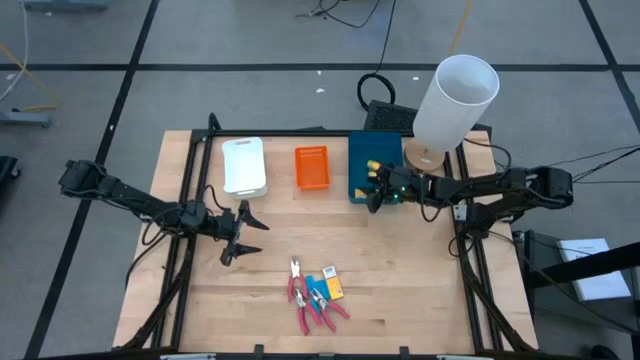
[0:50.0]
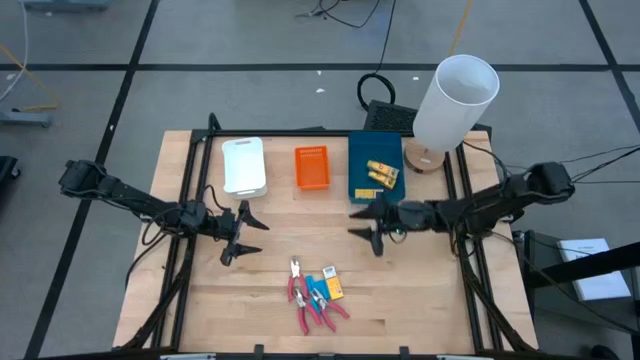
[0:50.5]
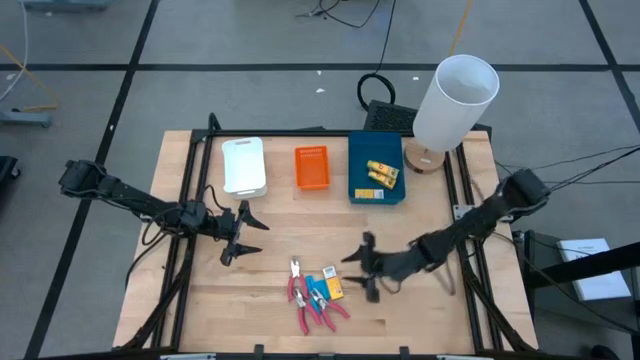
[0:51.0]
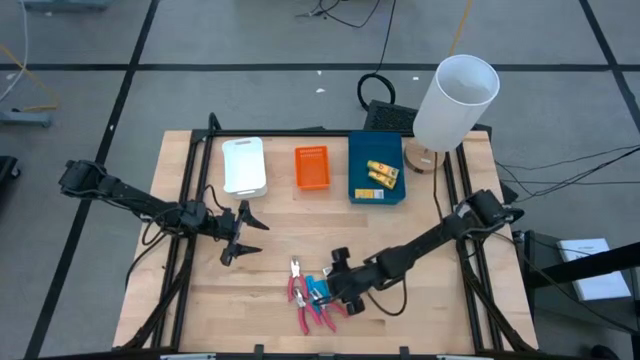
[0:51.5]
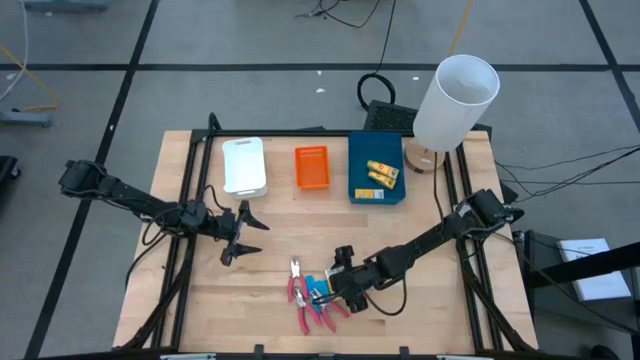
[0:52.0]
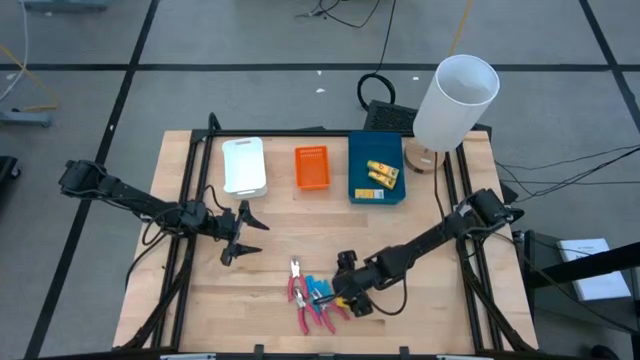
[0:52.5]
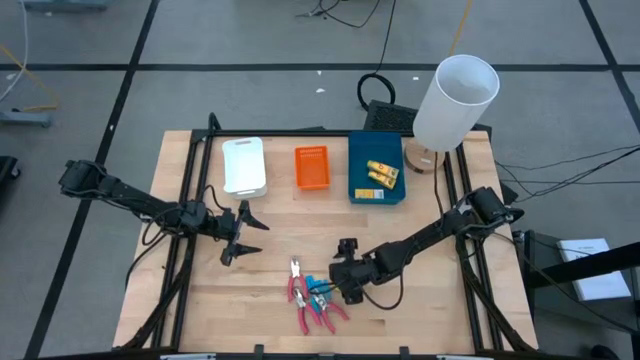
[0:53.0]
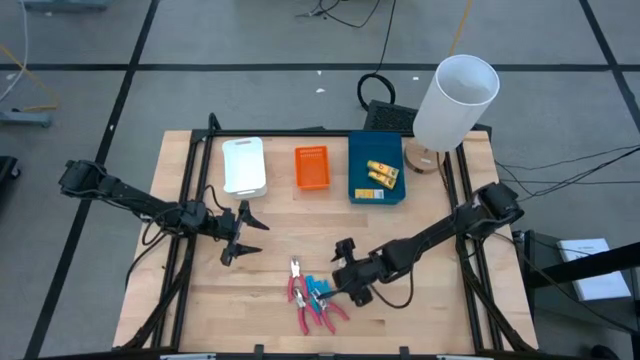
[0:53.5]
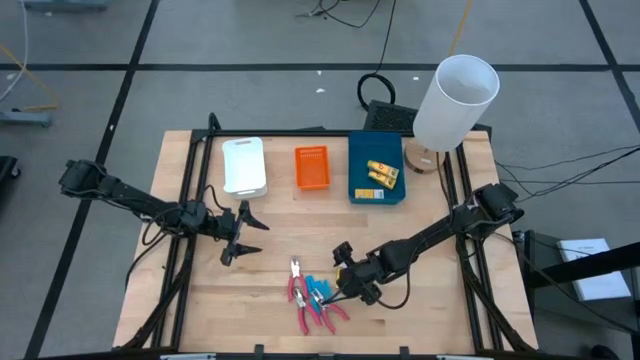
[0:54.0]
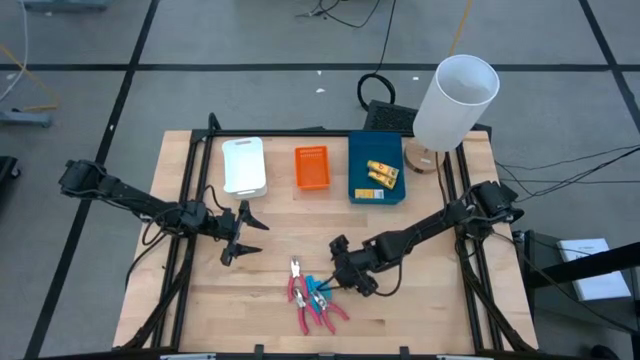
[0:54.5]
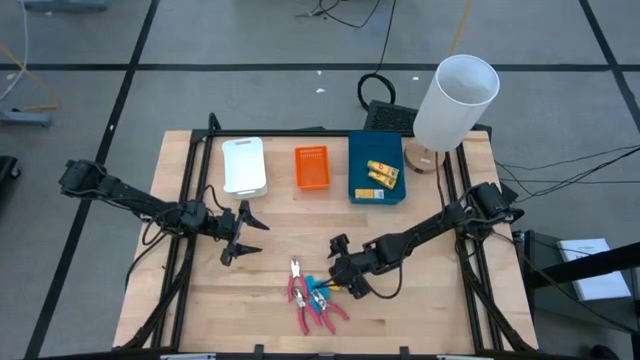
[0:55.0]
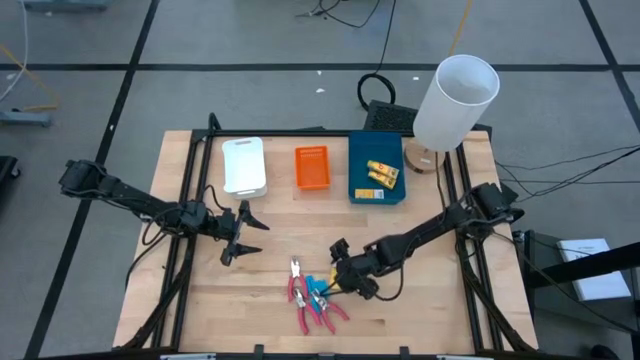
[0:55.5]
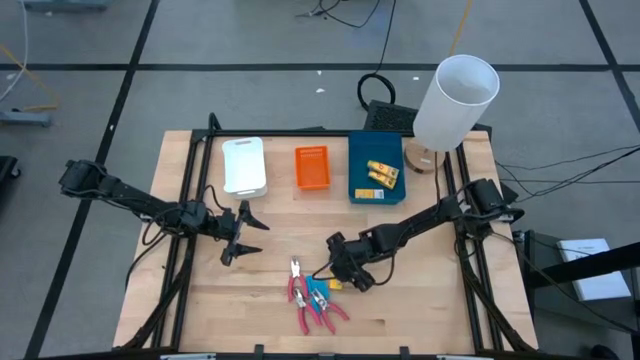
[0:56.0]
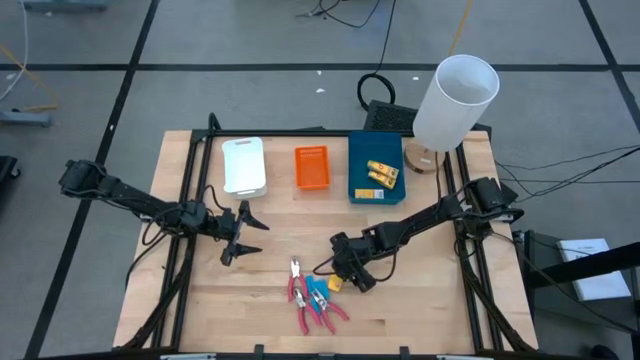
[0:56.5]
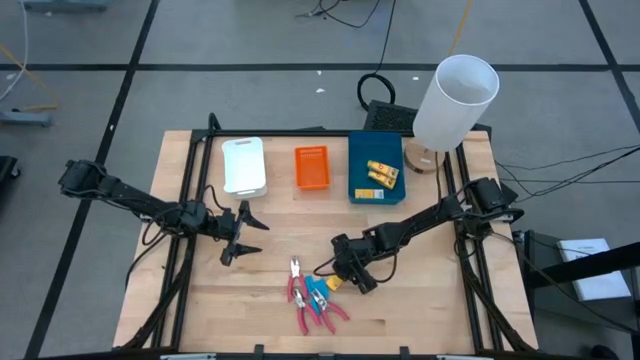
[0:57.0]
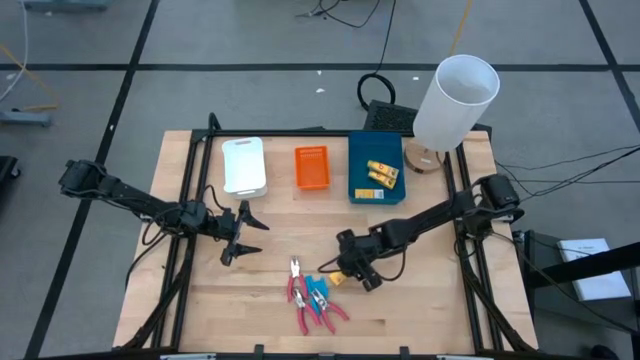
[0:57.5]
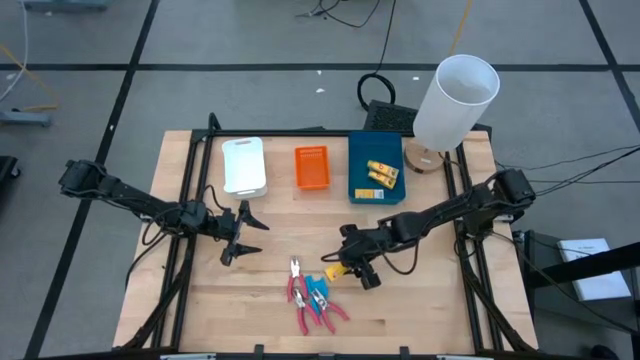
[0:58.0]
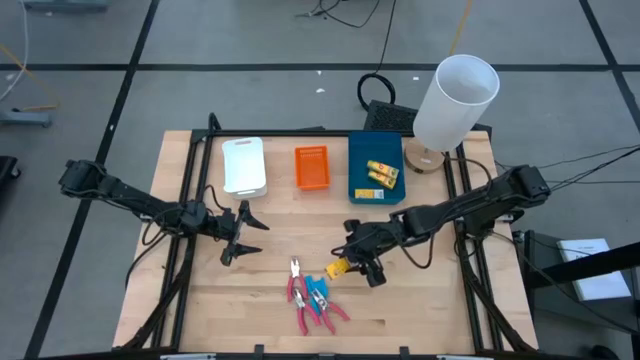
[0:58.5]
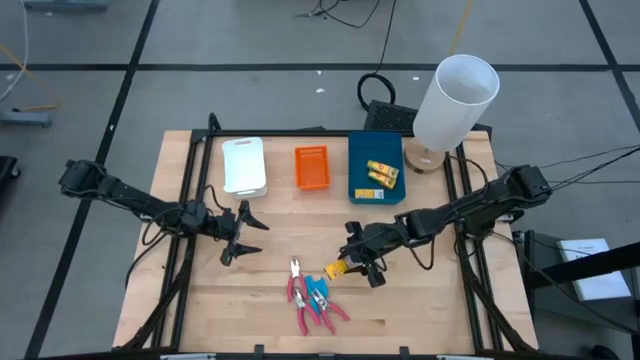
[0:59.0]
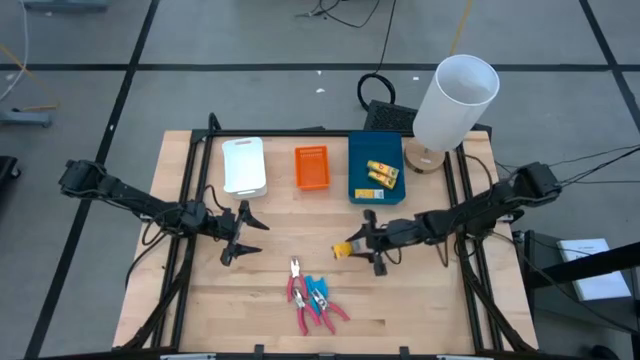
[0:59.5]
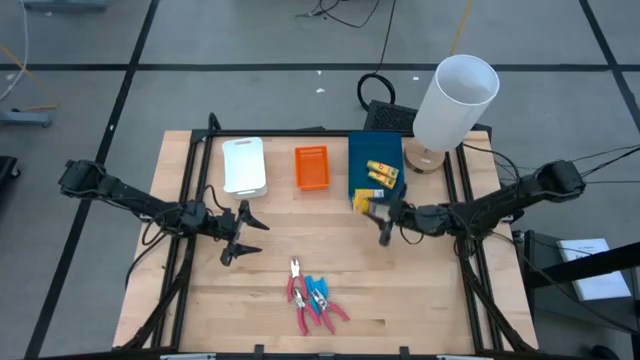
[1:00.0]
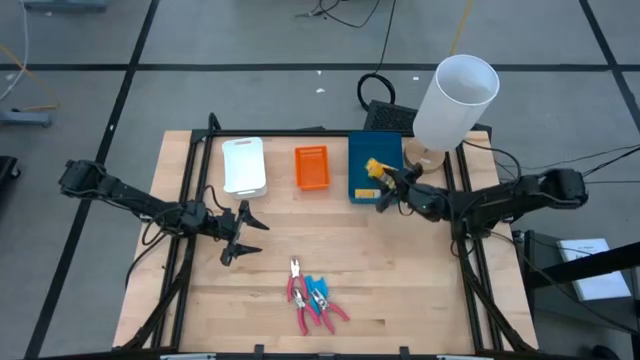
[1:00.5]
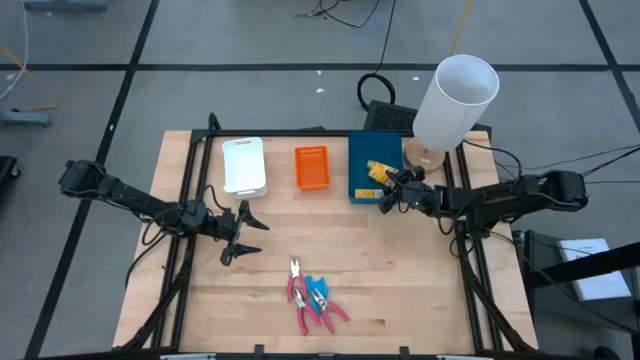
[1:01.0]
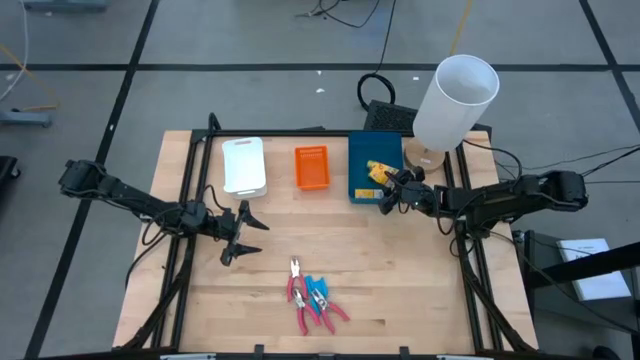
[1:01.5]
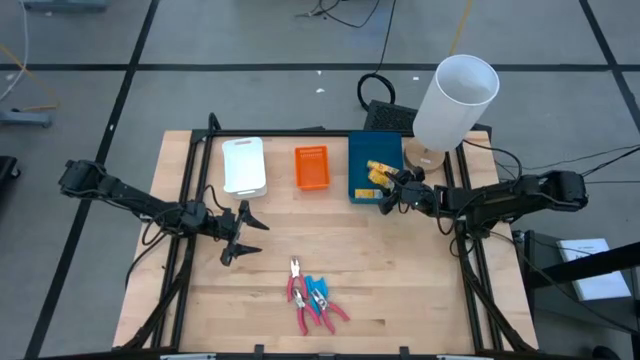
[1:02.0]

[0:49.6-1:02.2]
Task: Pick & Place School Supplies
Put the crayon box into the blue bin

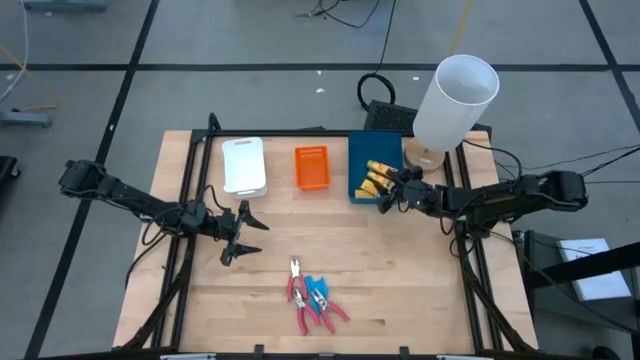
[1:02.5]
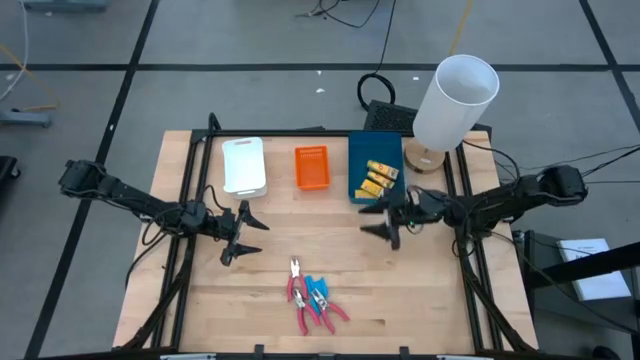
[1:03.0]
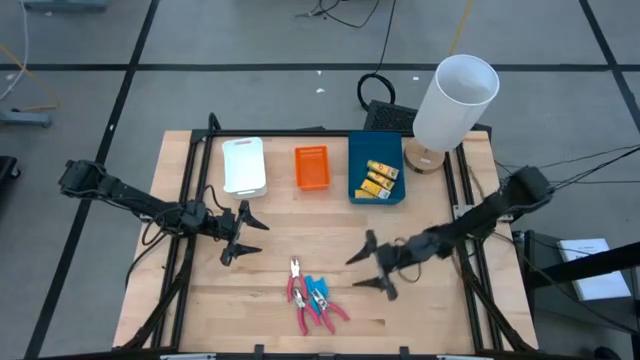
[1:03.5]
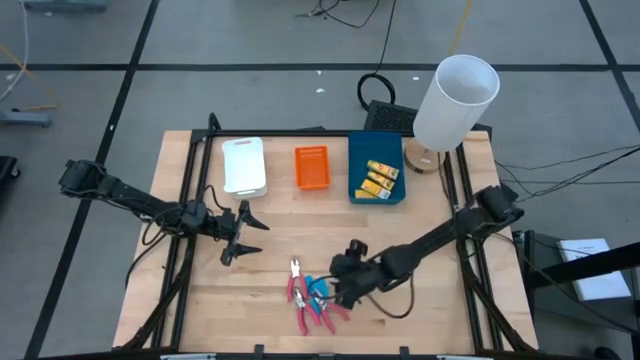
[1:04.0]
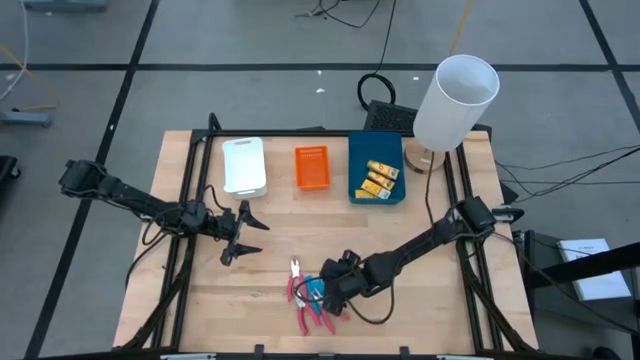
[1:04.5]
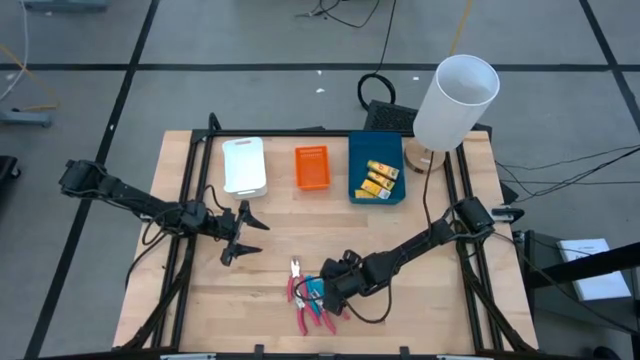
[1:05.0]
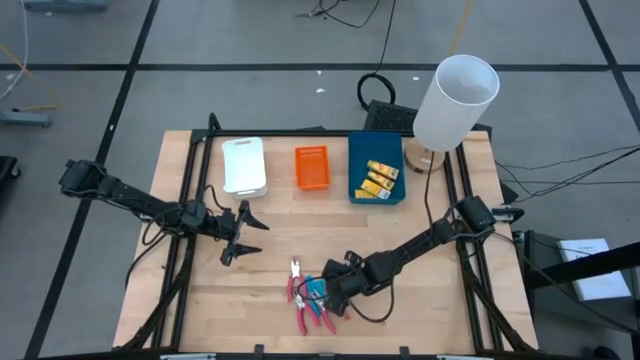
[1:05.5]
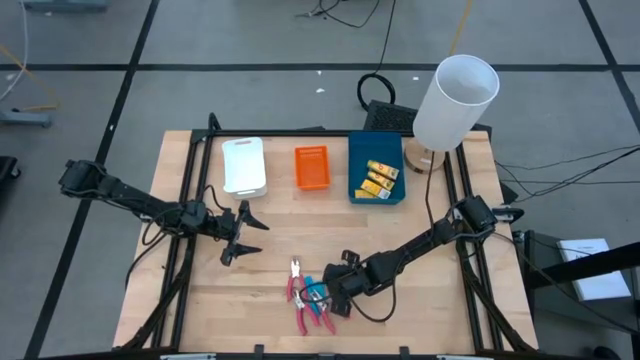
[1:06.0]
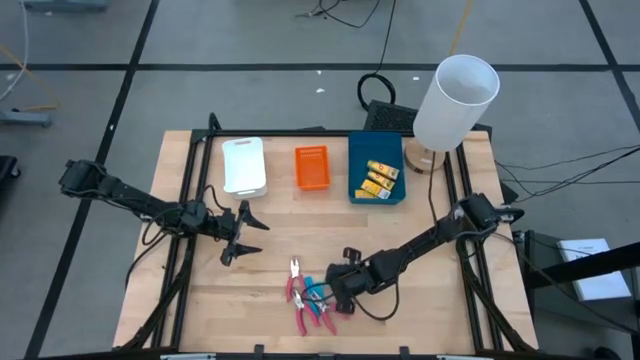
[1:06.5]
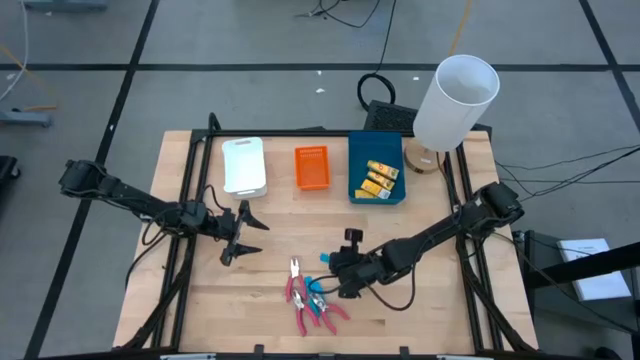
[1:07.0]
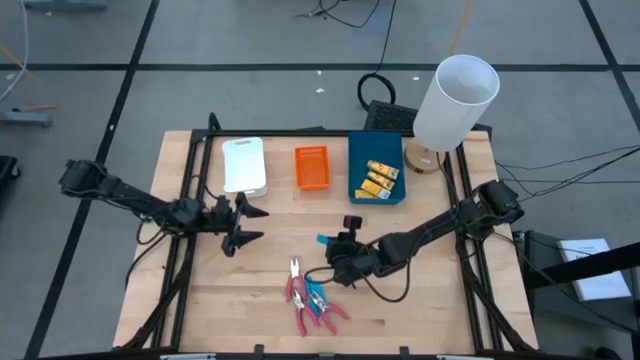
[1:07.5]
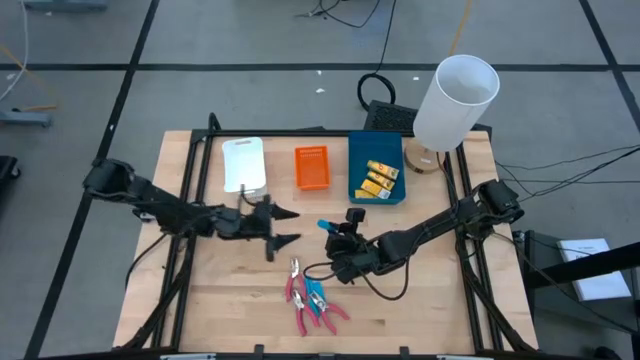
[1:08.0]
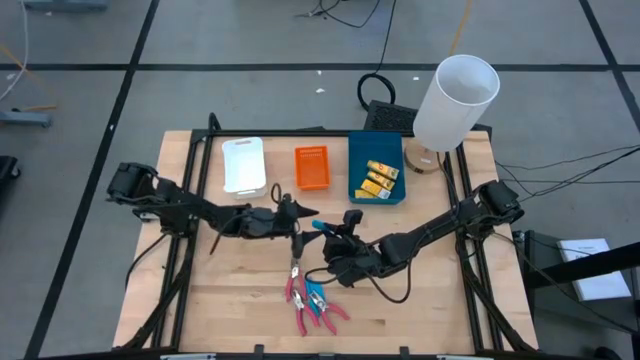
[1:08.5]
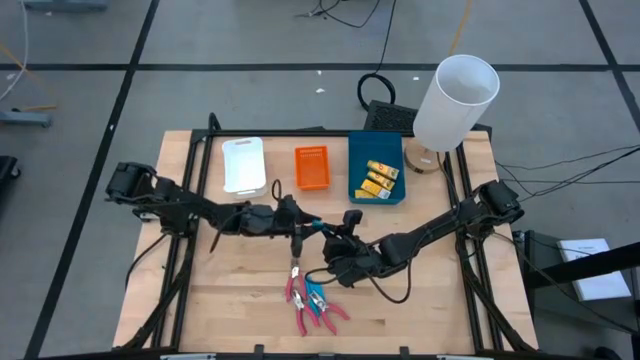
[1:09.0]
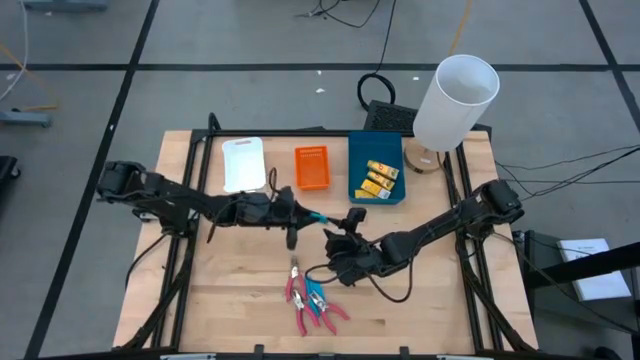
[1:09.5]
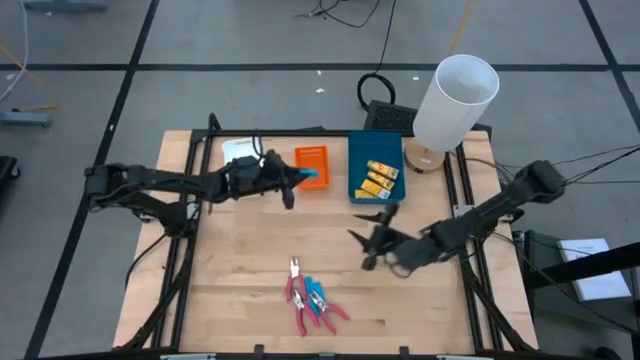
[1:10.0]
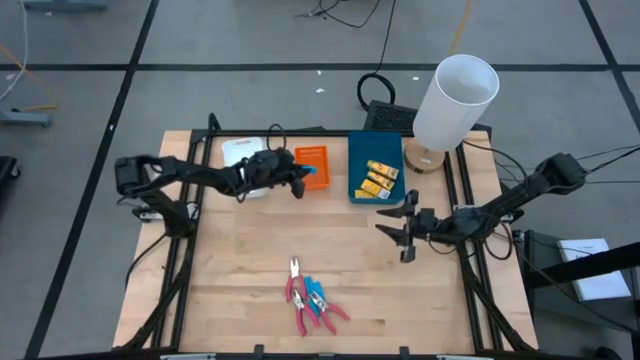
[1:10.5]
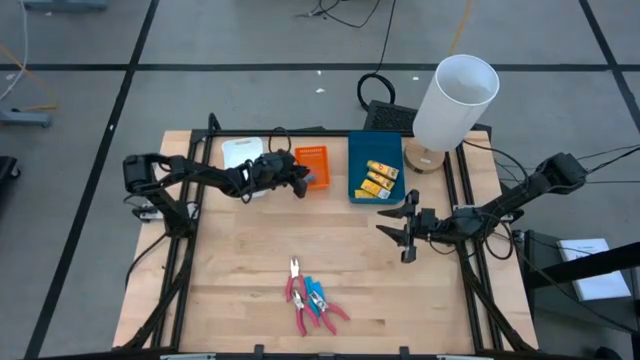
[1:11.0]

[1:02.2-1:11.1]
Put the crayon box into the blue bin
